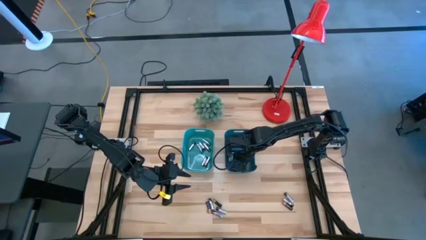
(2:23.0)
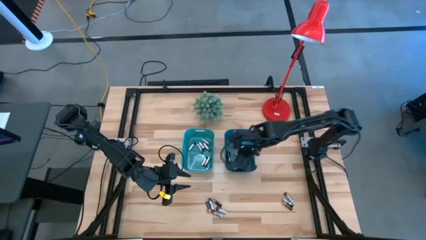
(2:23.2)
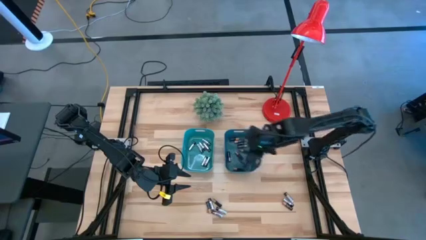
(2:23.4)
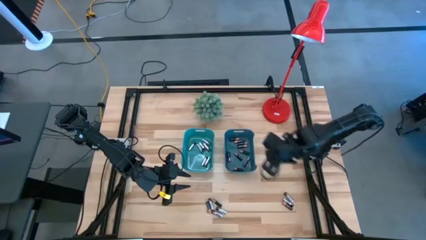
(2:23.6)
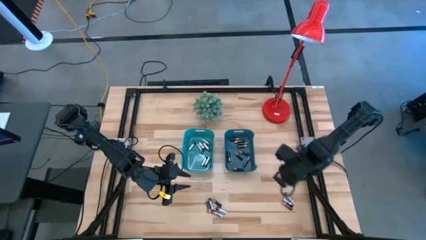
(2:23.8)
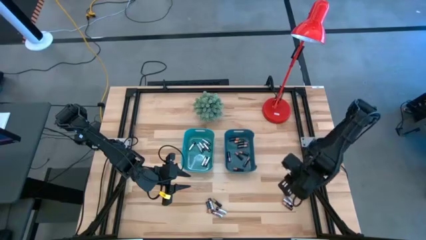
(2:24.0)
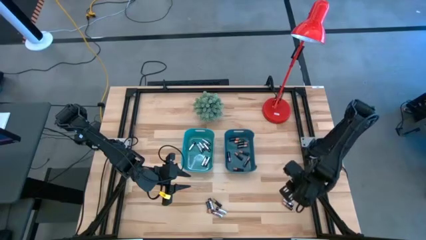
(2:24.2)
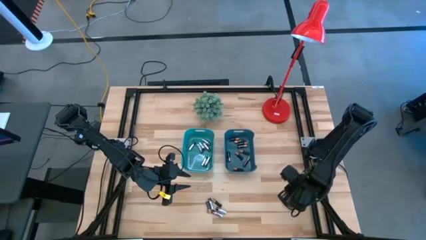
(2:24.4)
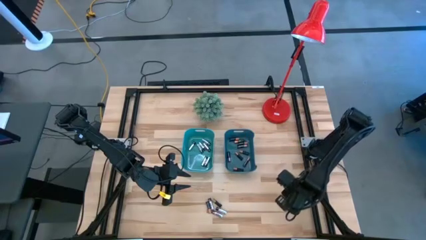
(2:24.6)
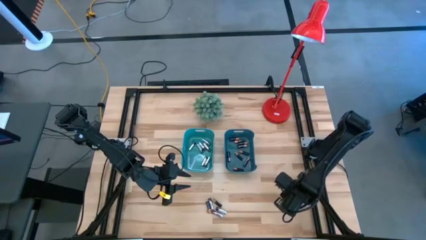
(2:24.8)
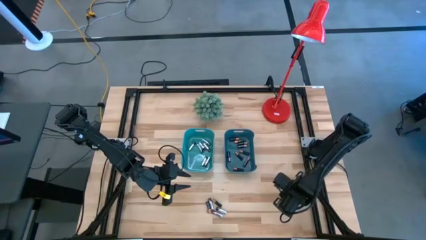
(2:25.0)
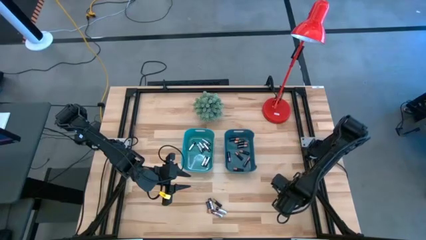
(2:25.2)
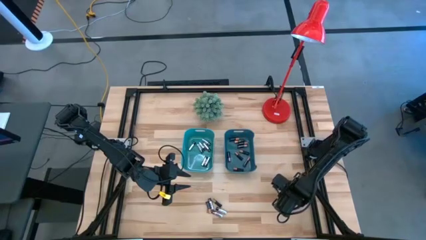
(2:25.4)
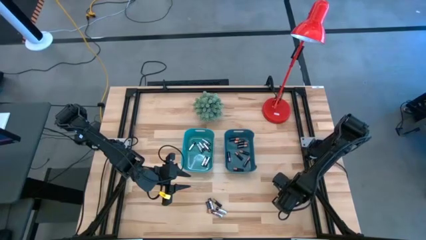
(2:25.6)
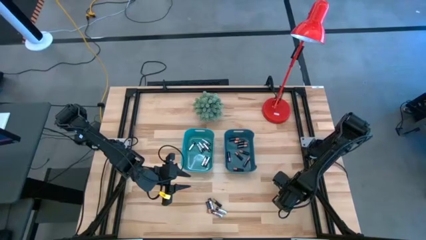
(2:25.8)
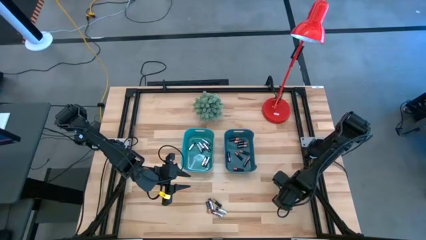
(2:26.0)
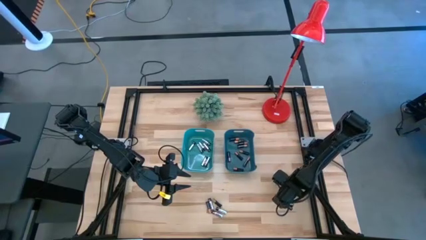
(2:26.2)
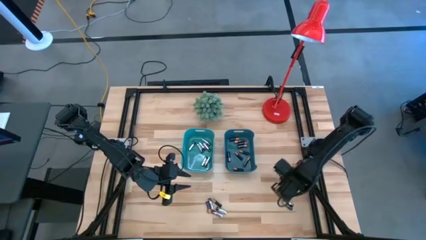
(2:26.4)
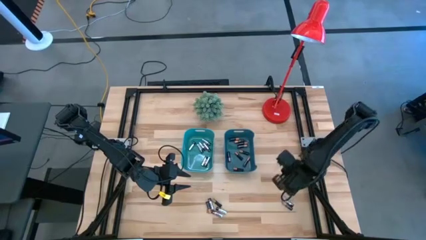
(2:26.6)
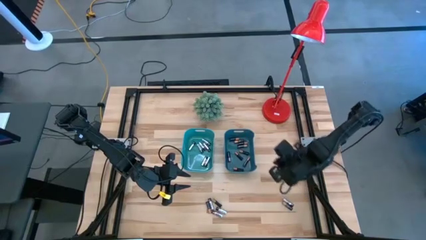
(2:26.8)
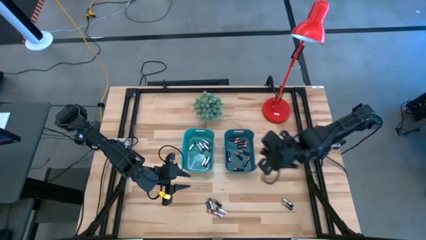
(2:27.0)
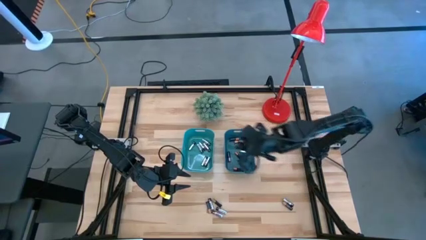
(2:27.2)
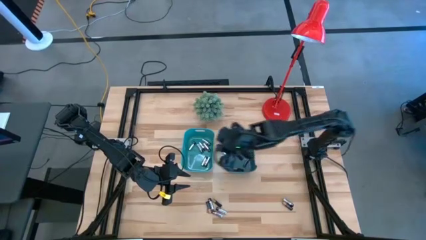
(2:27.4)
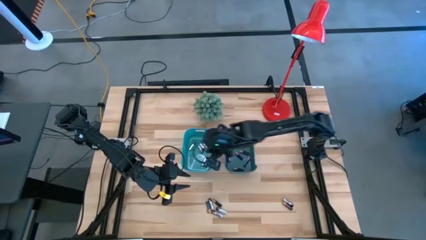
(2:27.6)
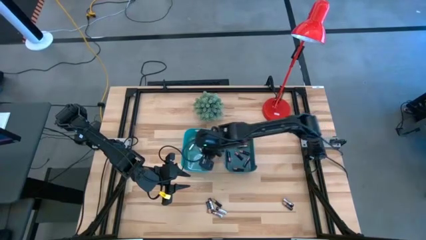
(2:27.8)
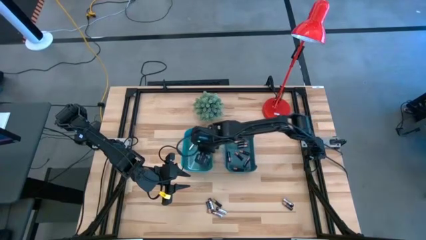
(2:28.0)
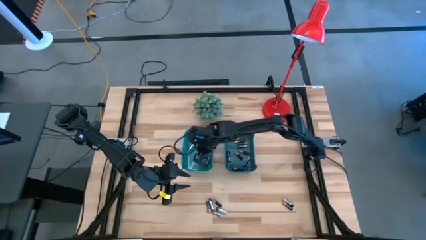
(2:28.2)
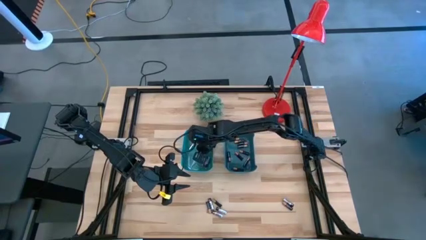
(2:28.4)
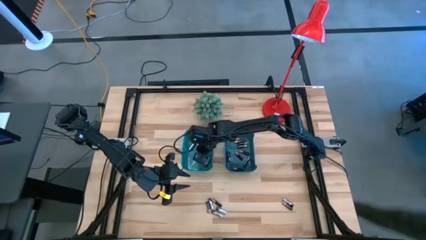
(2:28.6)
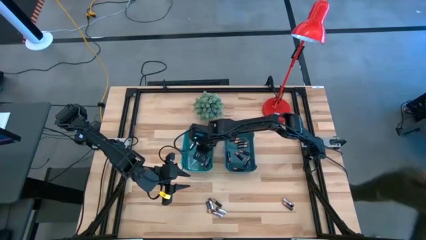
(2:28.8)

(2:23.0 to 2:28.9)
Task: Sort batteries
Put the silver battery into the green bin

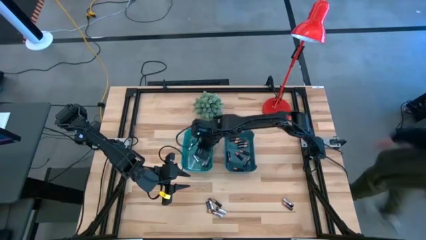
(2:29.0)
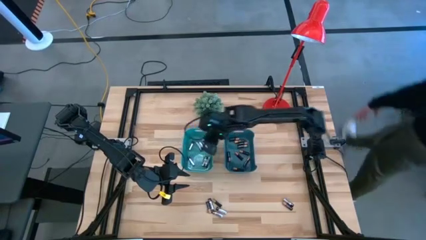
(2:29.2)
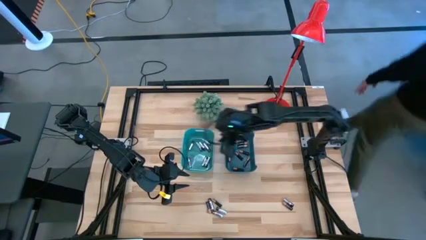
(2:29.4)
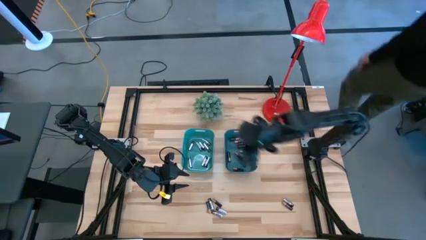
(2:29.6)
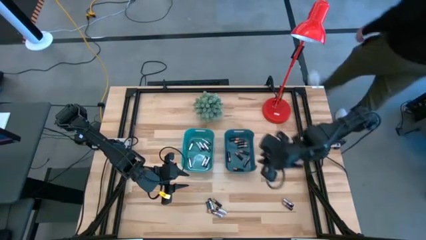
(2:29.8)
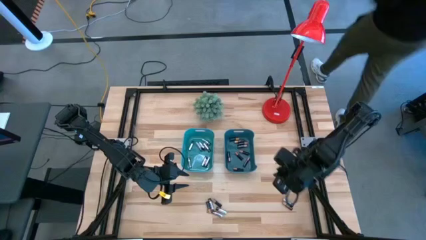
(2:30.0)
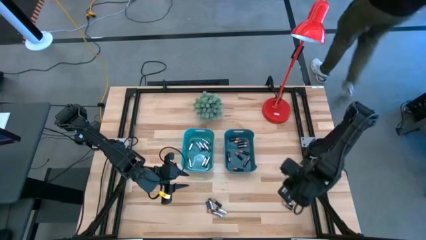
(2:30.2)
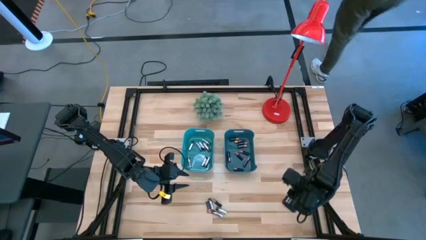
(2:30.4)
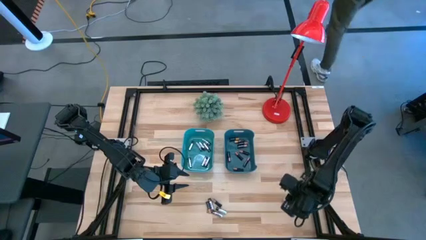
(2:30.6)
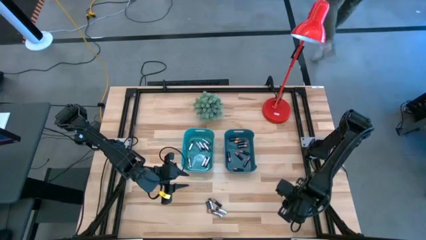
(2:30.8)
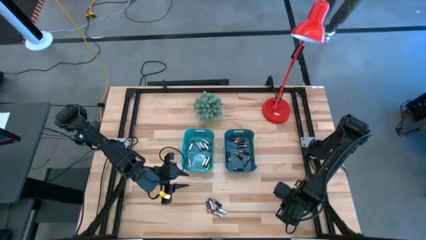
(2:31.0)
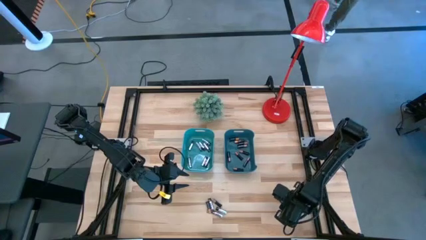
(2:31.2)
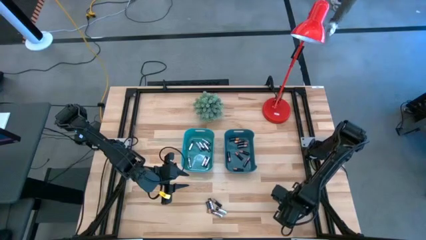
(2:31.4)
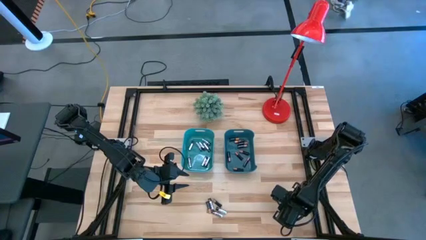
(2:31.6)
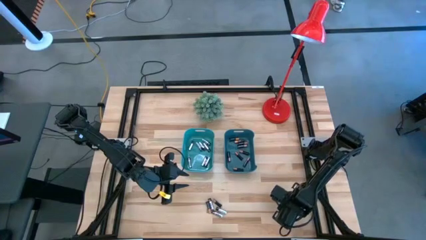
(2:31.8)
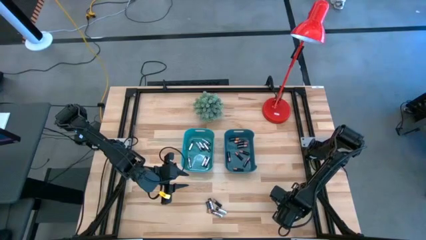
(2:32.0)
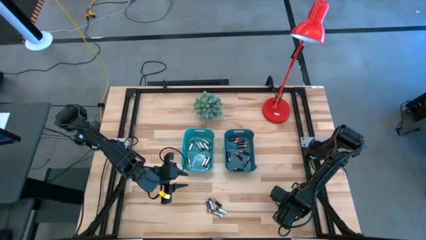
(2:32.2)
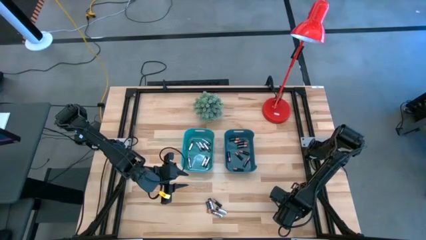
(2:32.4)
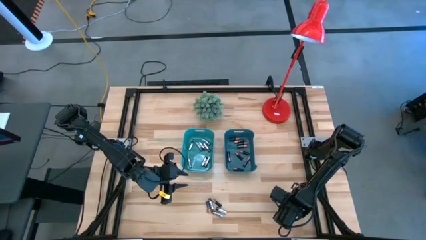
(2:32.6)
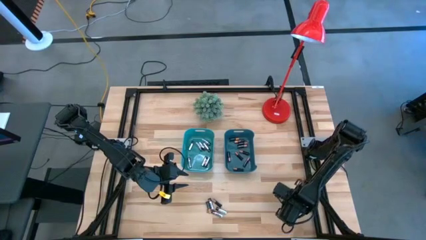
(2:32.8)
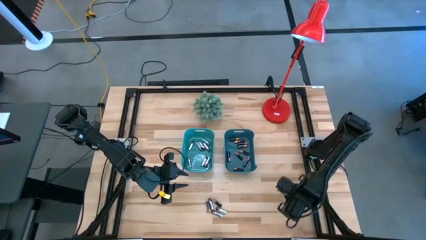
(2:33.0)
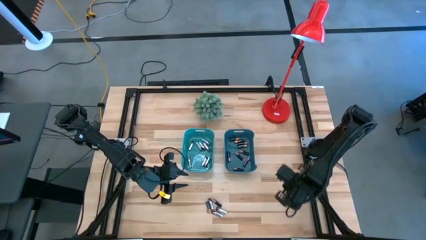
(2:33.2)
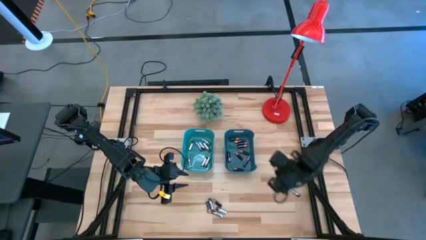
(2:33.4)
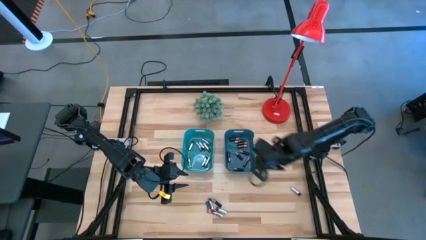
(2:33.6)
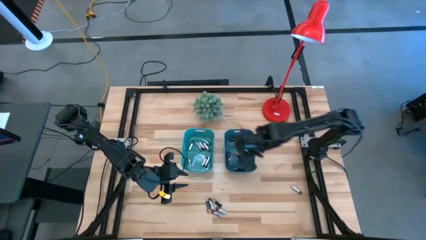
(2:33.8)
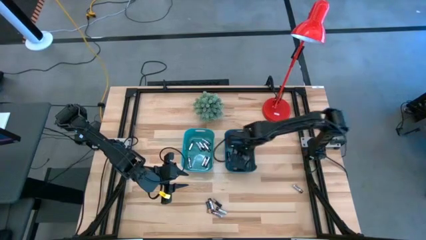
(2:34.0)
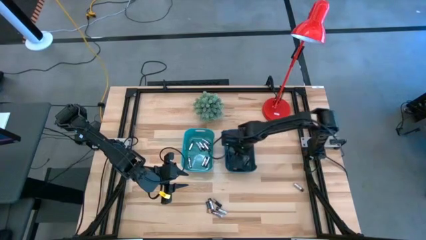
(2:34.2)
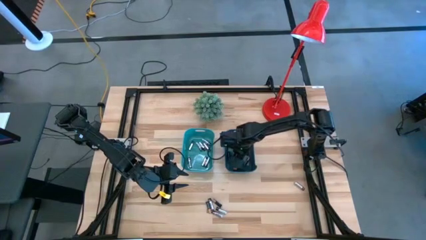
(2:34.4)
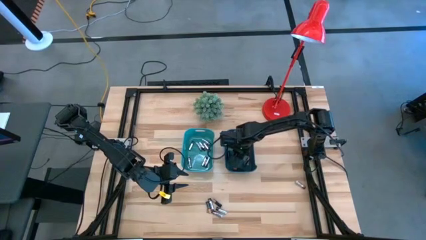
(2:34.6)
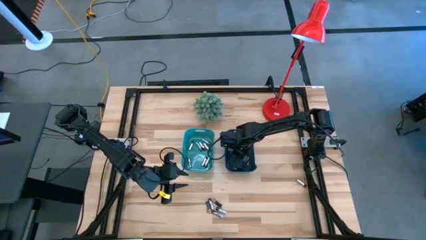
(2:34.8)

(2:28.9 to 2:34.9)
Put the black battery into the blue bin

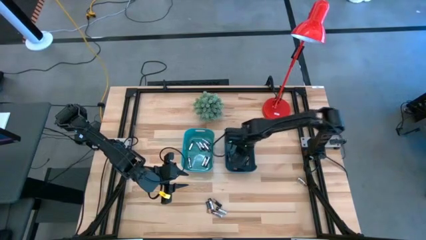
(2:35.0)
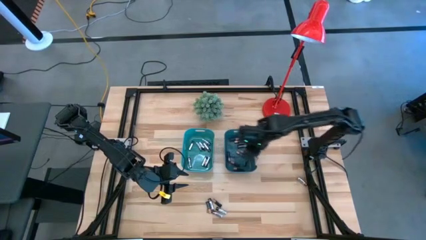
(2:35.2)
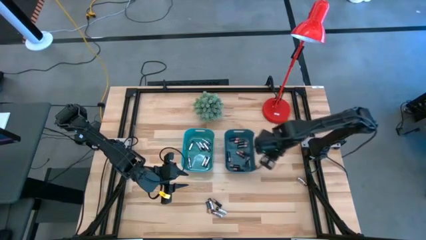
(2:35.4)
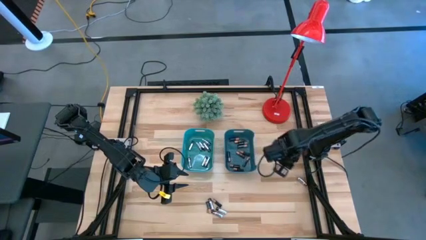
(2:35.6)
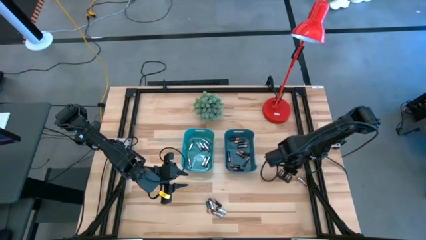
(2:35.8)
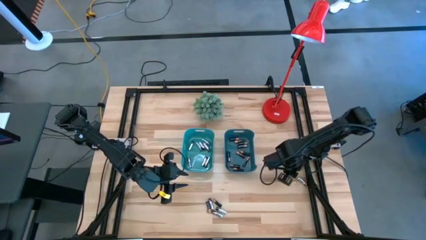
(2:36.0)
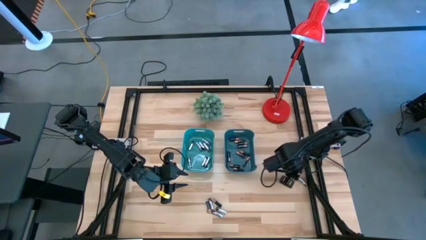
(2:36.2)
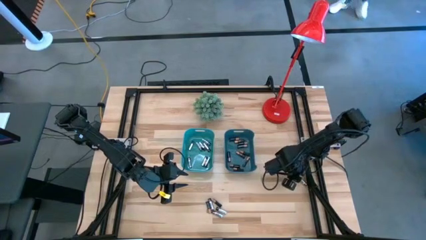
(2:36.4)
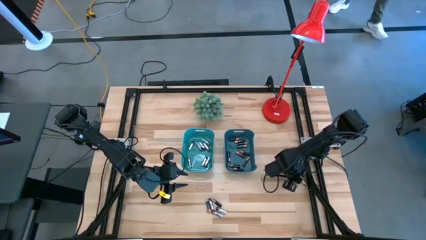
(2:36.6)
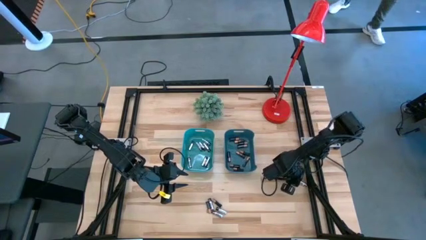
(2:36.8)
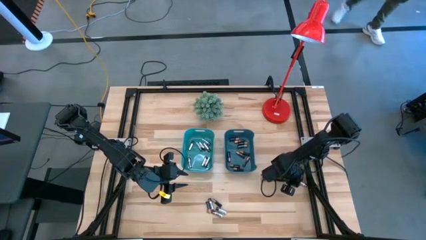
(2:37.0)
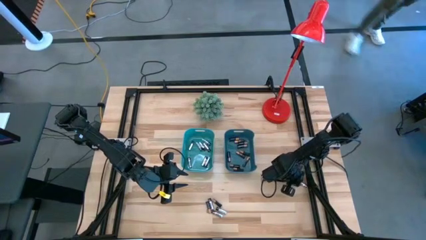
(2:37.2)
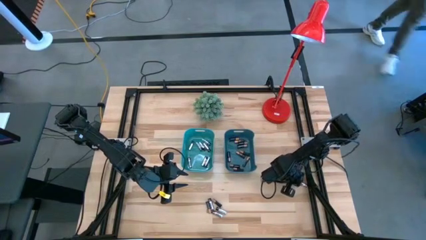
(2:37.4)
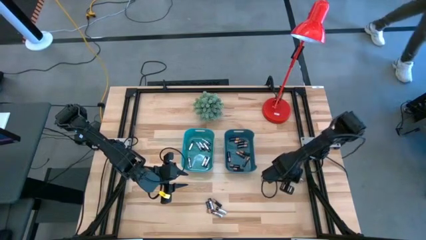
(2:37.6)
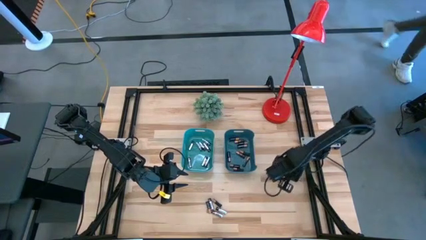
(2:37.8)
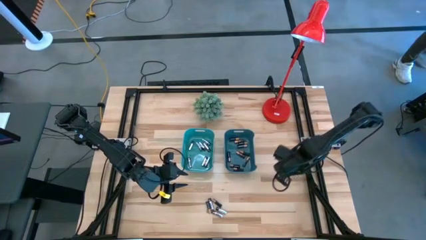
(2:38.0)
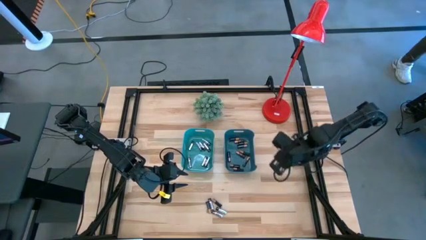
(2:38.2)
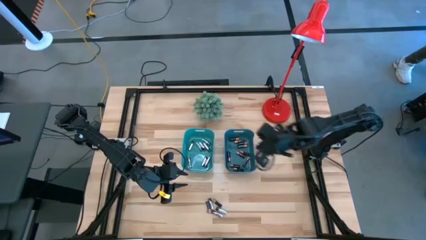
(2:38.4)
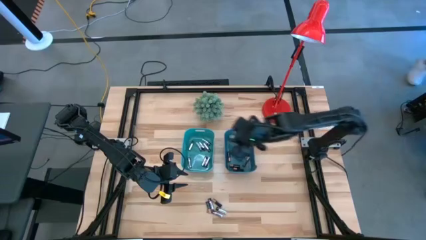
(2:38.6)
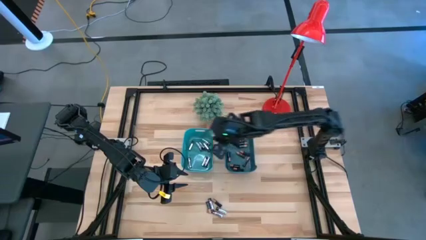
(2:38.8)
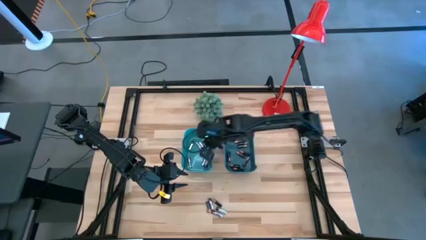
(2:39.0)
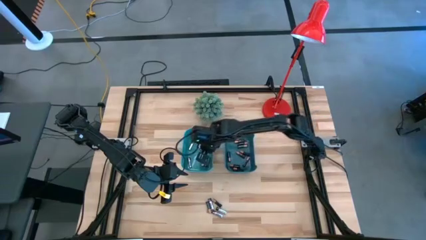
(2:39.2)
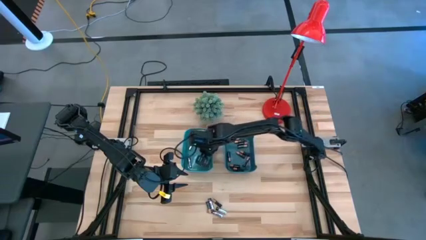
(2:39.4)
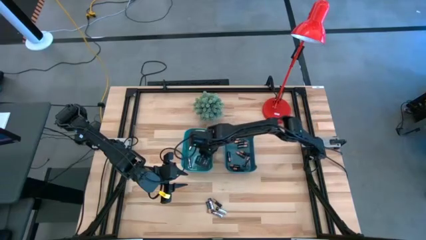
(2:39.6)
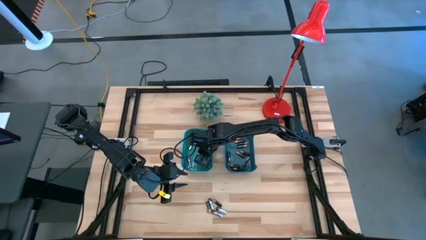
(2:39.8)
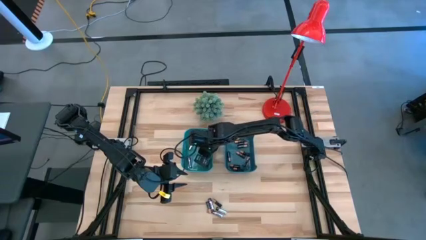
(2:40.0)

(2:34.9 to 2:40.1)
Put the silver battery into the green bin

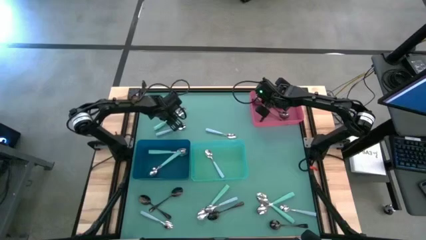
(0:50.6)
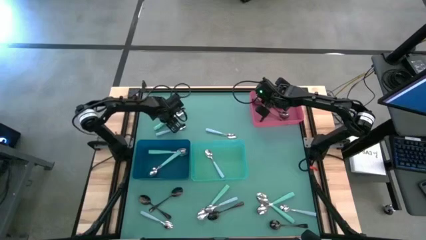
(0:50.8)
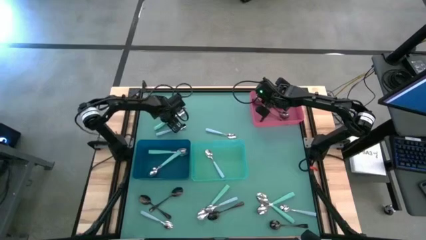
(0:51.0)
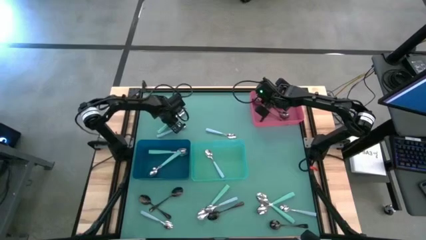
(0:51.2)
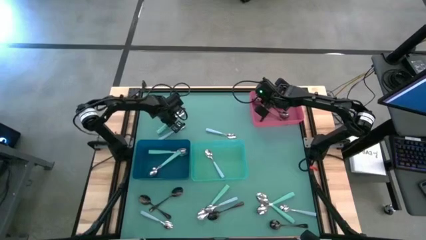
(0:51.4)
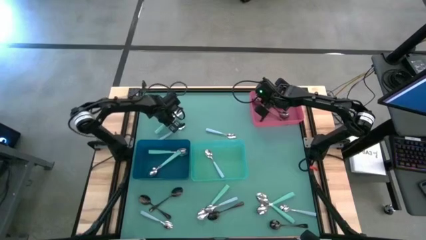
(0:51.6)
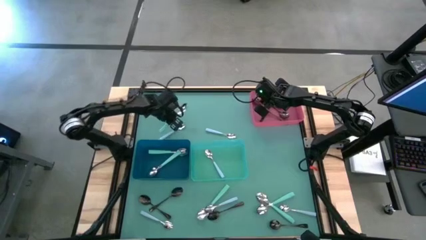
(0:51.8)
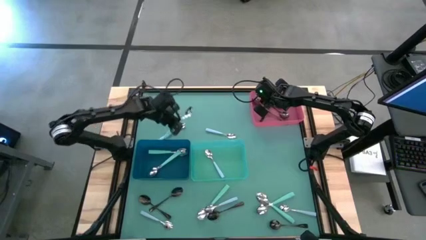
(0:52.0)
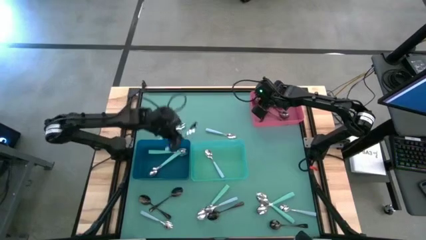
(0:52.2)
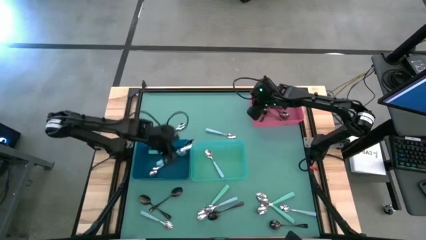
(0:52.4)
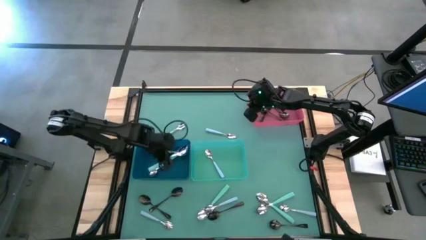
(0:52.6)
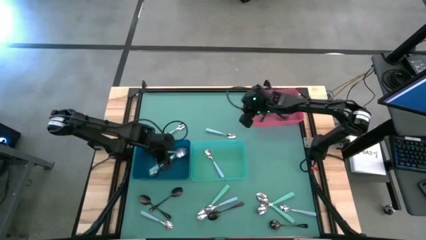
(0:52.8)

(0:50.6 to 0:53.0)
Task: Sort silverware by color (type)
Put the green spoon into the blue bin
